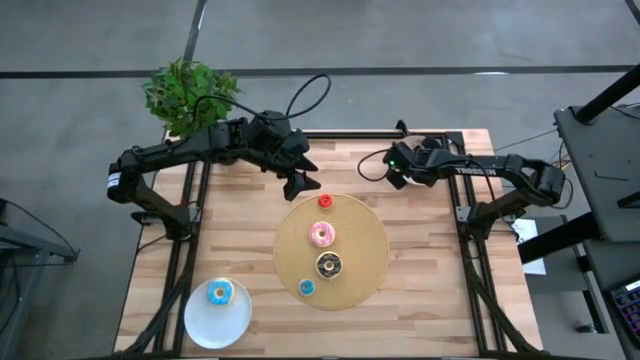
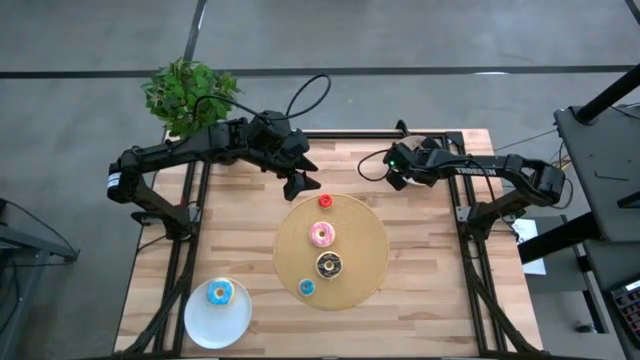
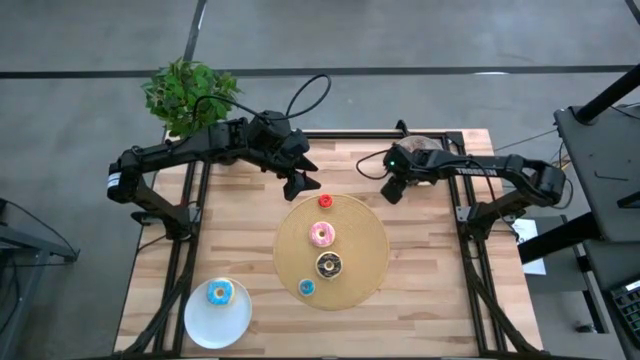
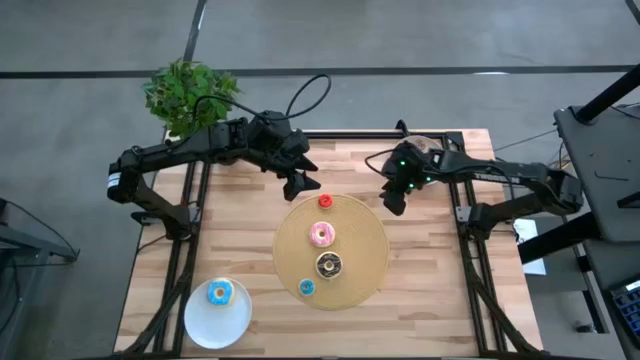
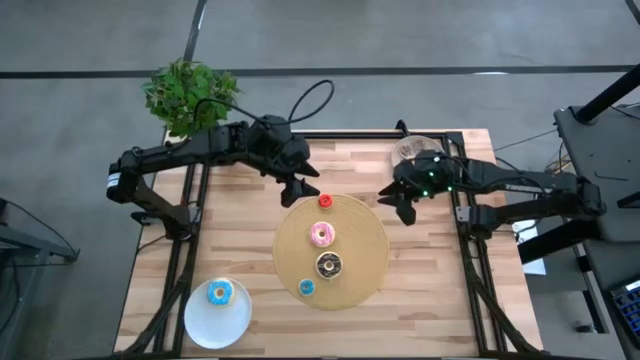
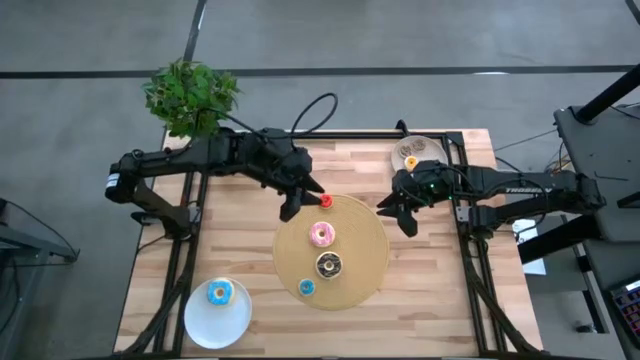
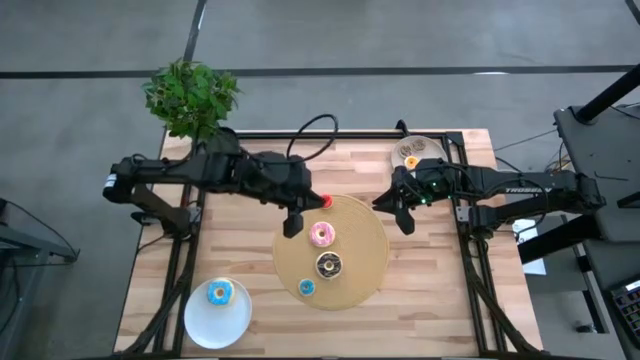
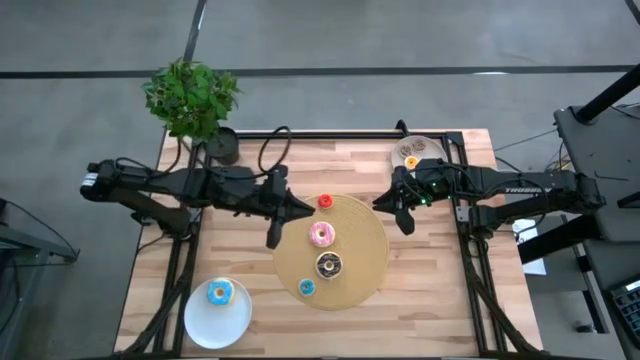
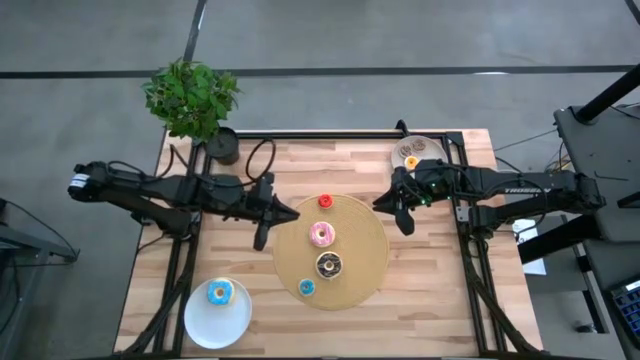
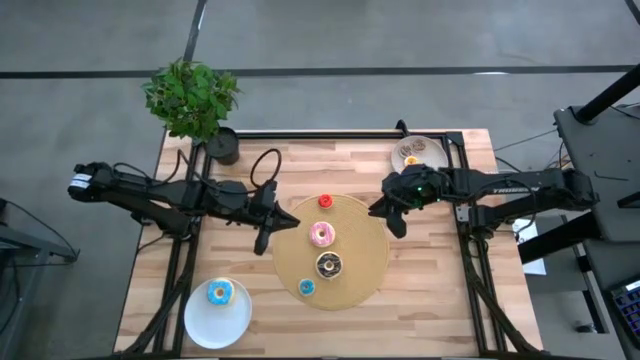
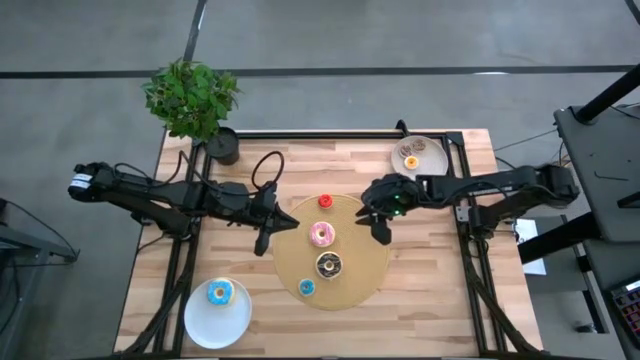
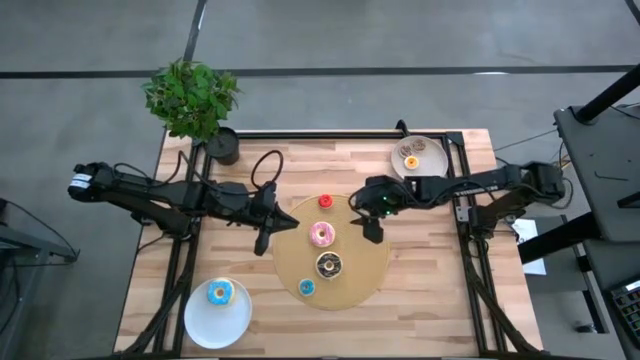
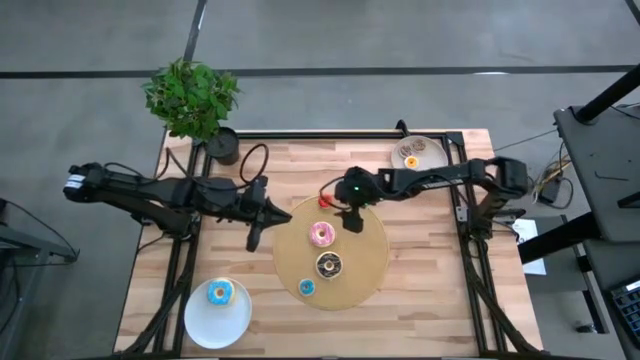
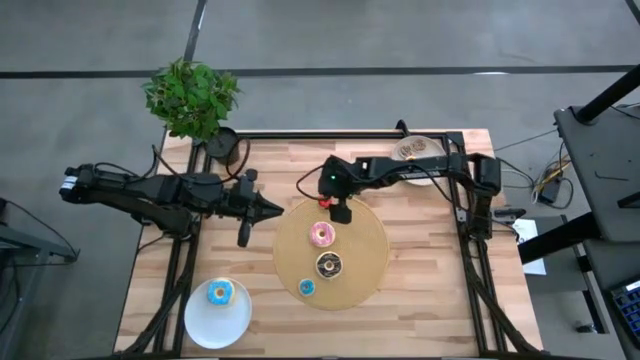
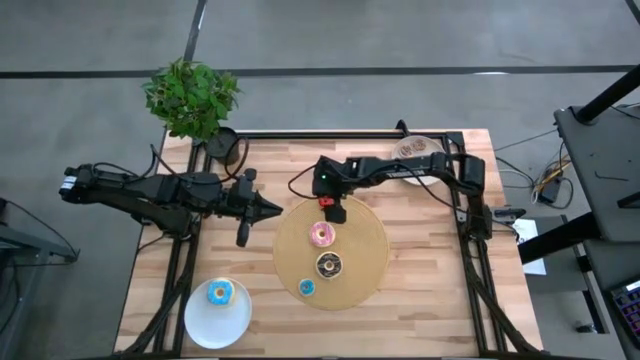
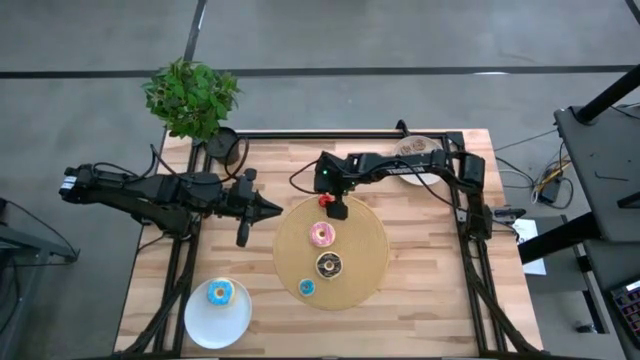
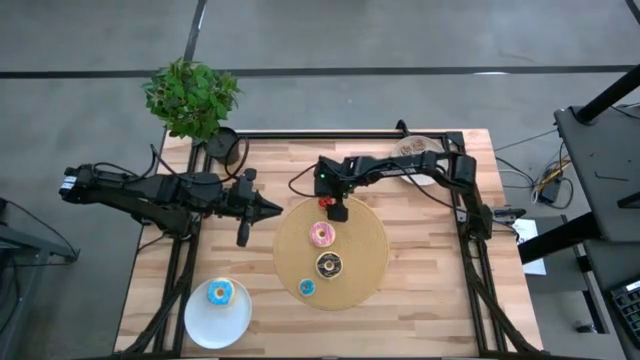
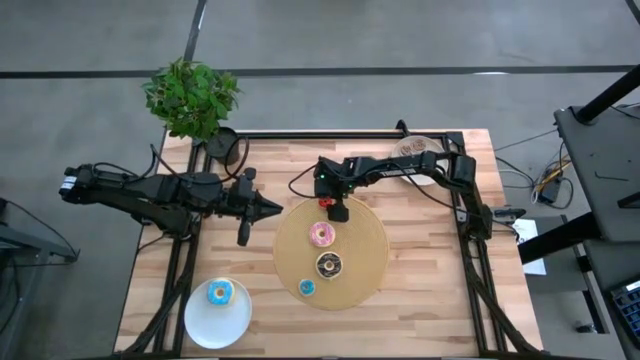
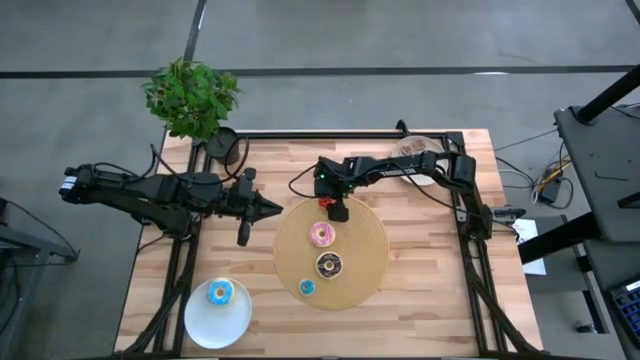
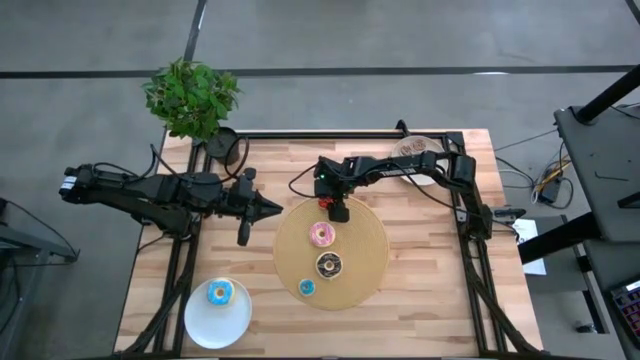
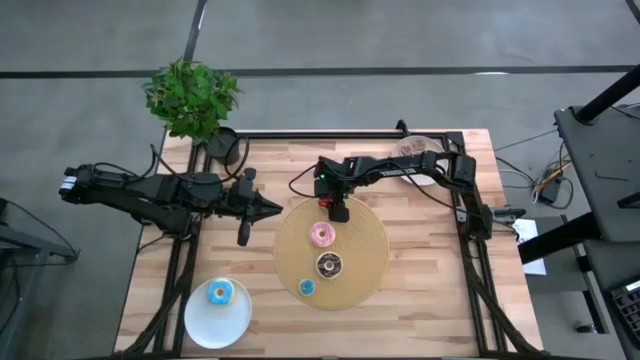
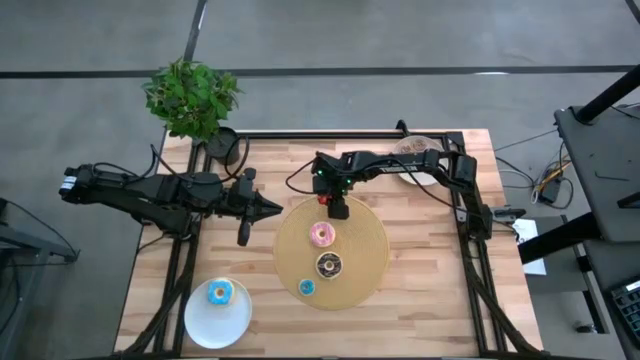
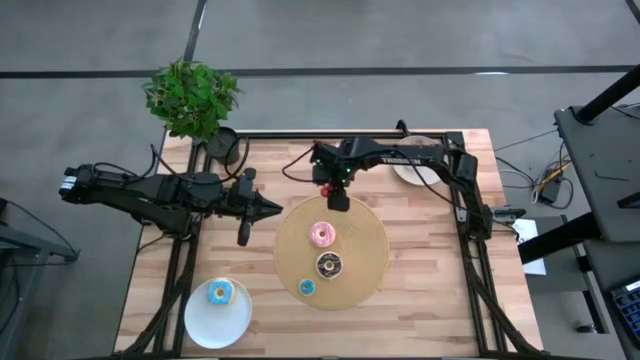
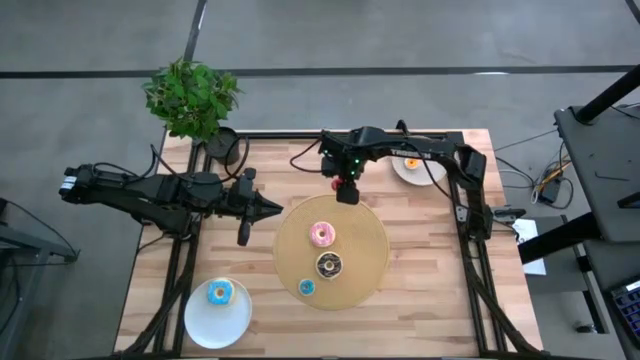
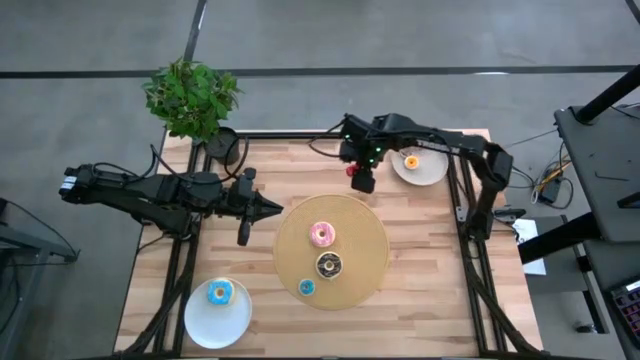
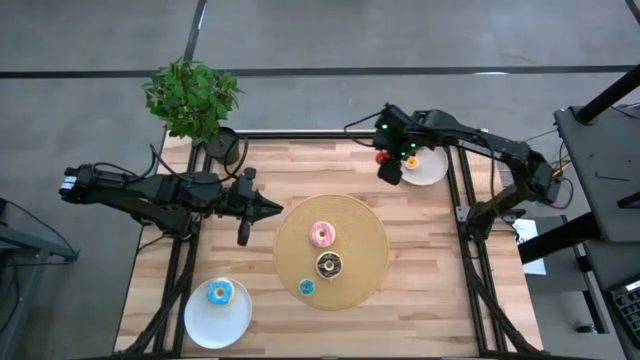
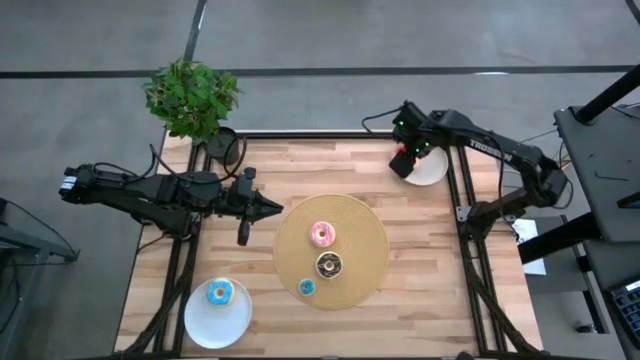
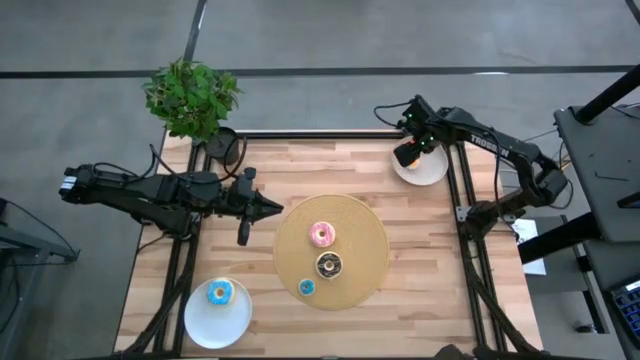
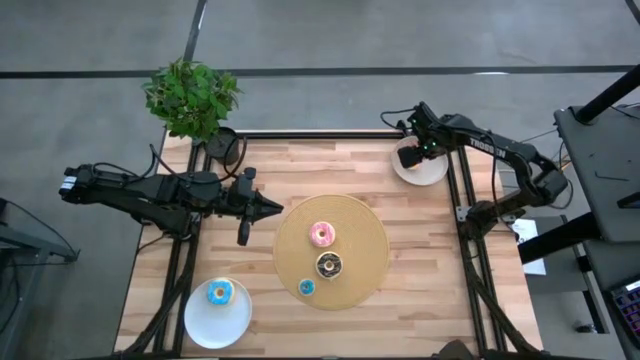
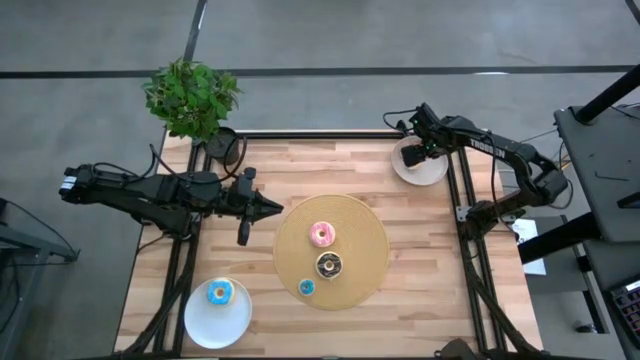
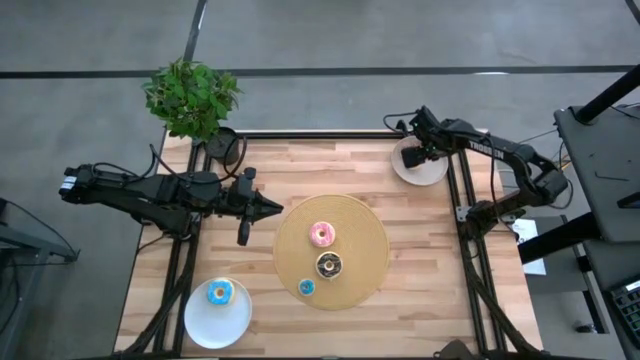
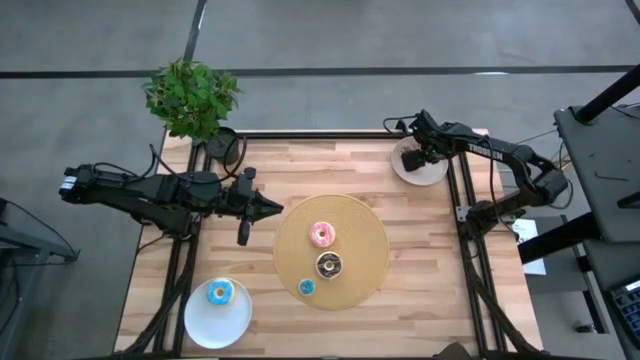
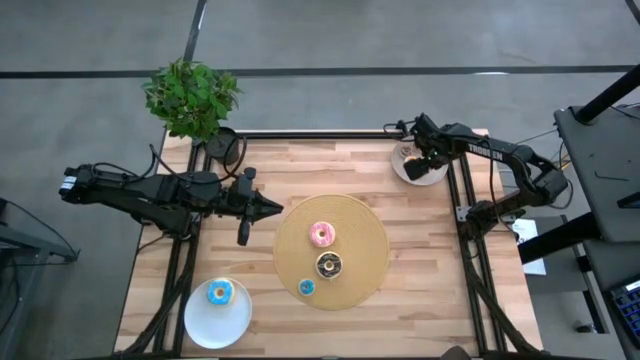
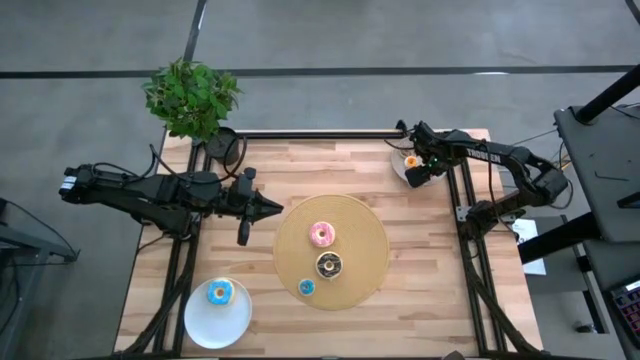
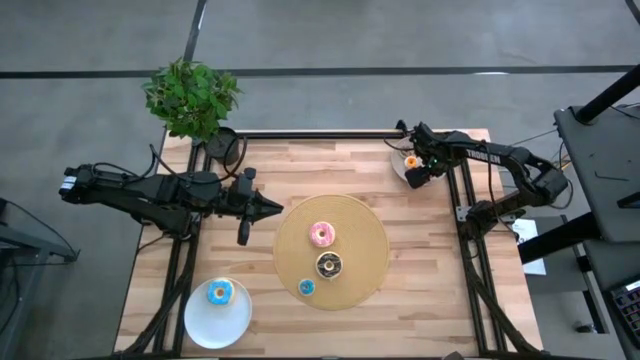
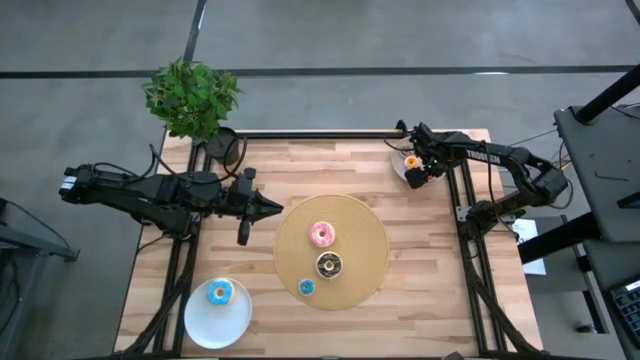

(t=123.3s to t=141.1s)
Task: Pick & Place donuts
Put the small red donut on the gray plate

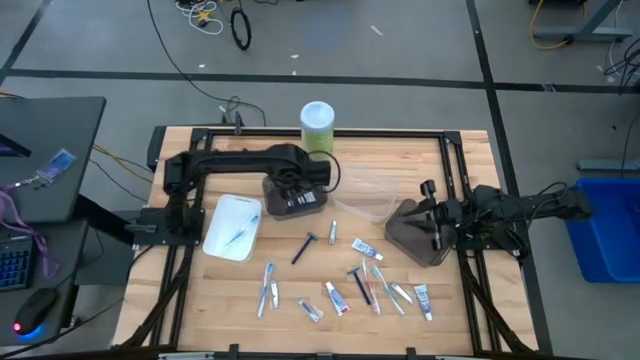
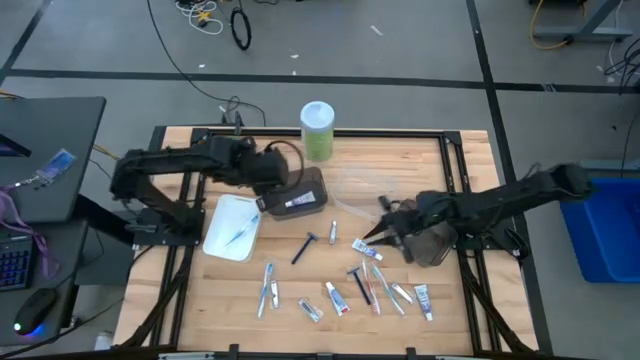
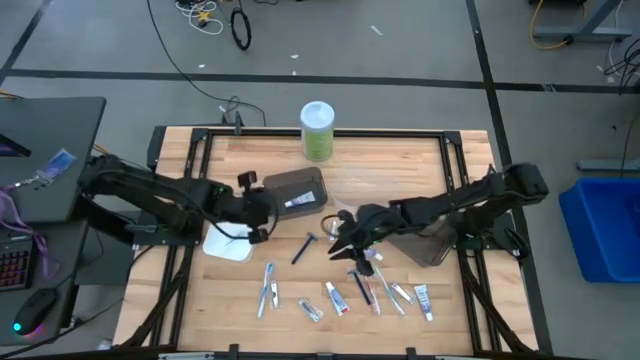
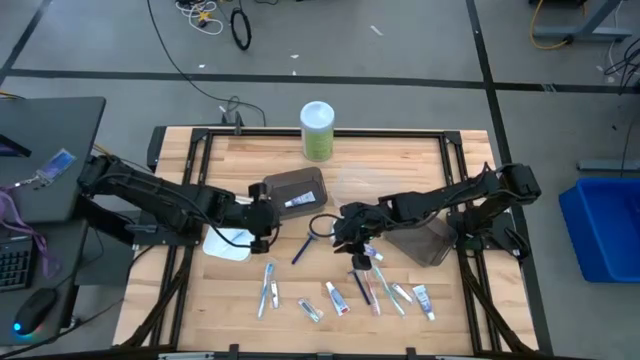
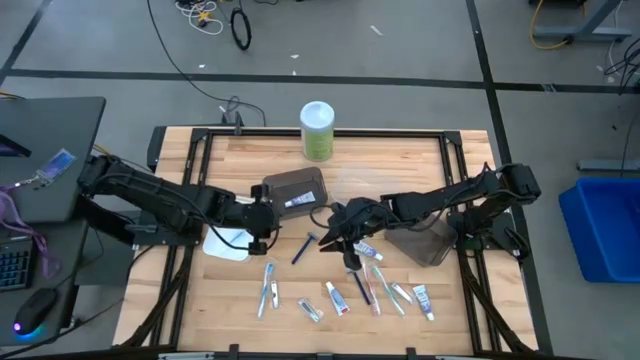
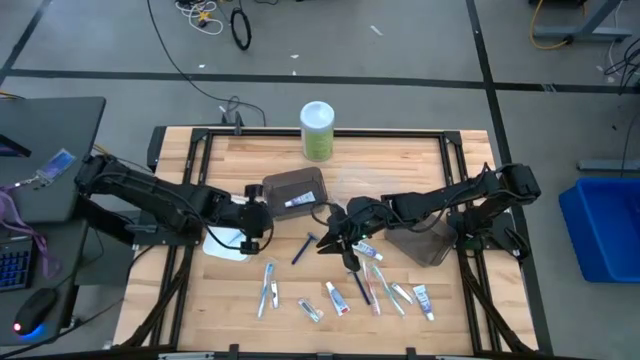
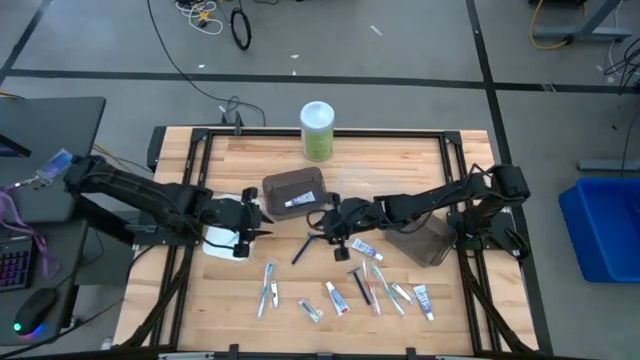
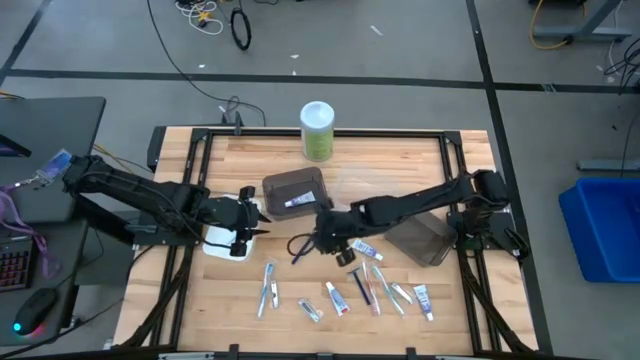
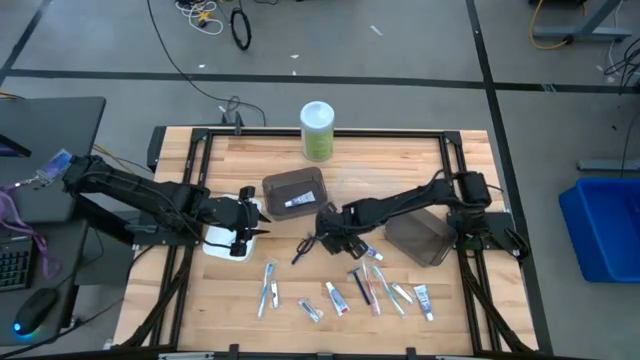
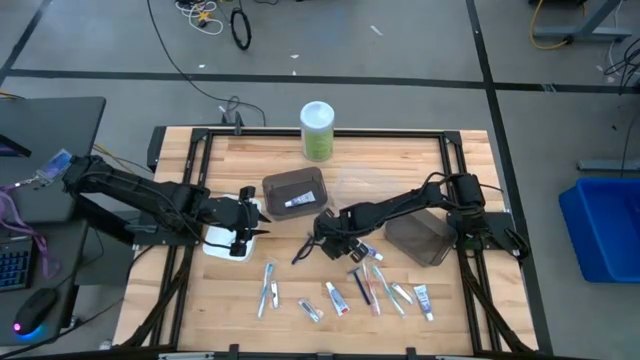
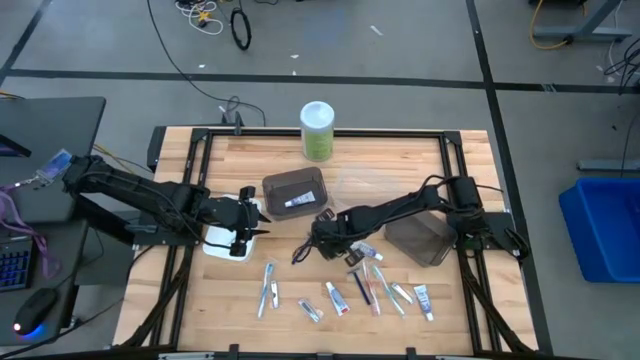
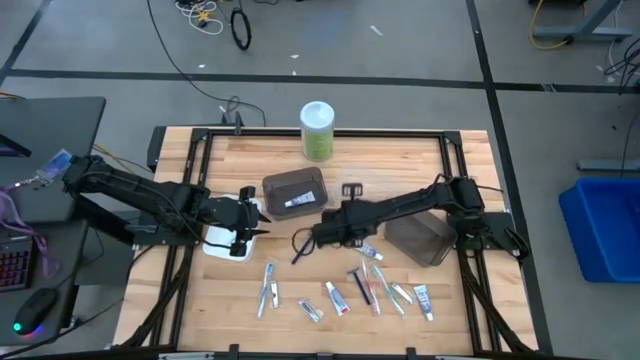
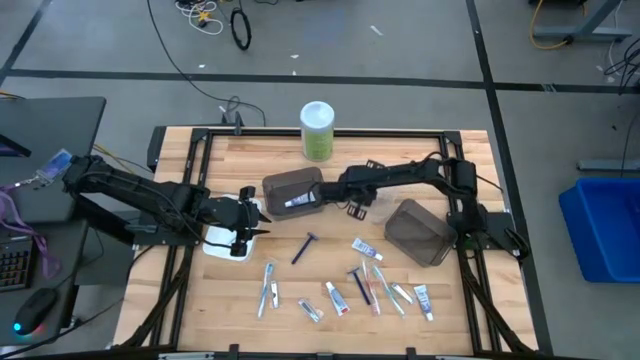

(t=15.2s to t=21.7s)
Task: Pick & Place Travel size toiletries
Put the nail cutter into the transparent bin
